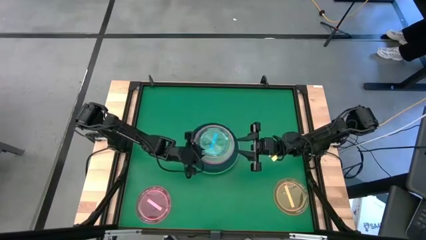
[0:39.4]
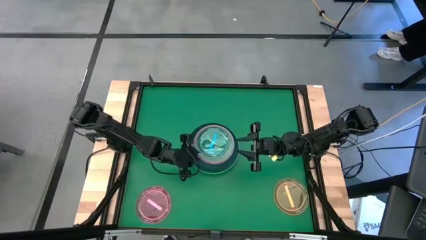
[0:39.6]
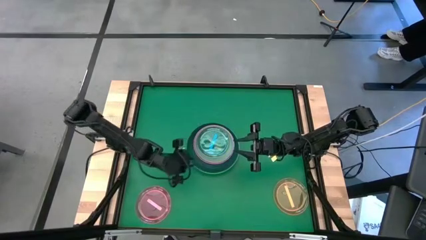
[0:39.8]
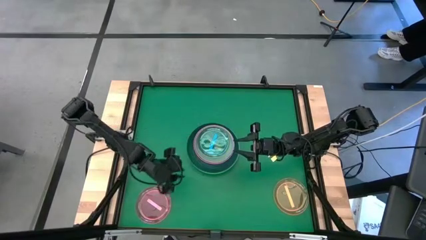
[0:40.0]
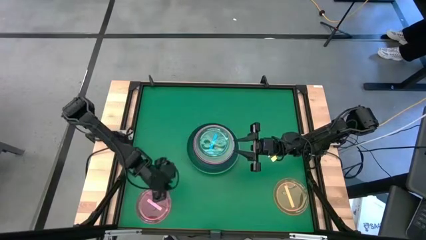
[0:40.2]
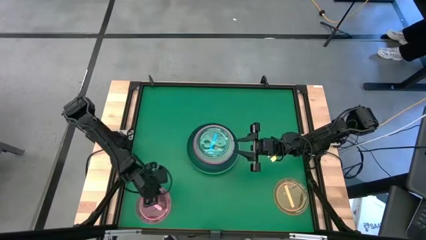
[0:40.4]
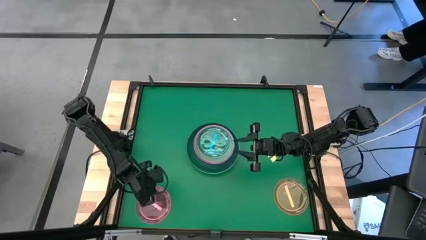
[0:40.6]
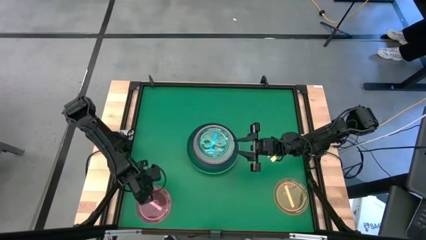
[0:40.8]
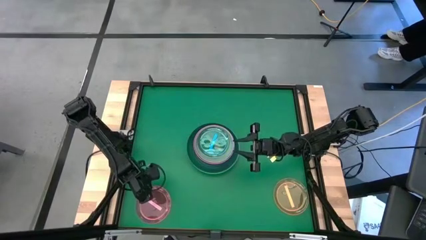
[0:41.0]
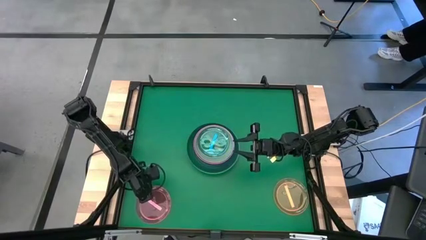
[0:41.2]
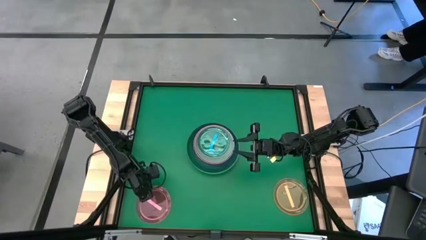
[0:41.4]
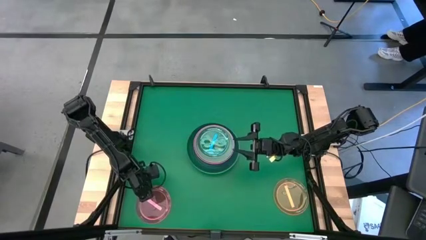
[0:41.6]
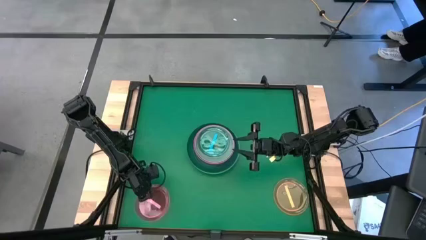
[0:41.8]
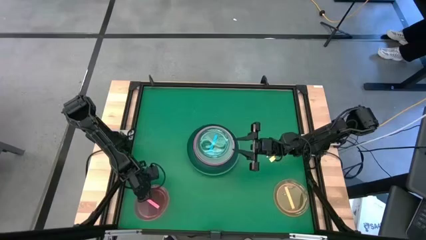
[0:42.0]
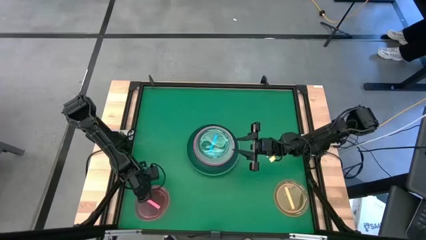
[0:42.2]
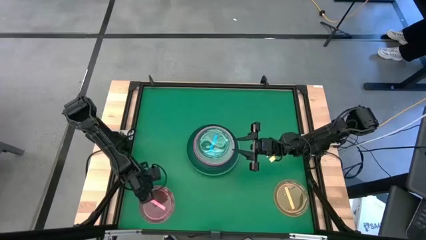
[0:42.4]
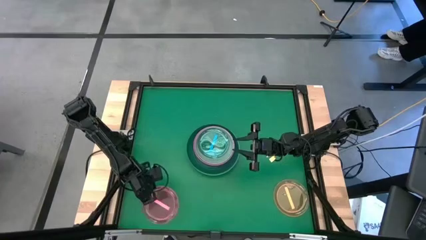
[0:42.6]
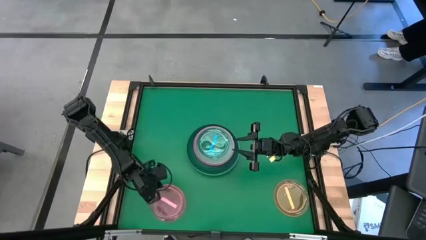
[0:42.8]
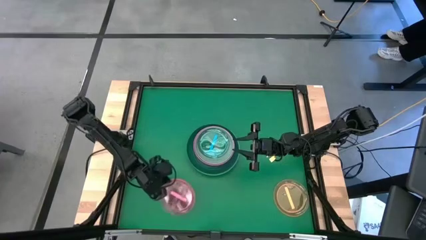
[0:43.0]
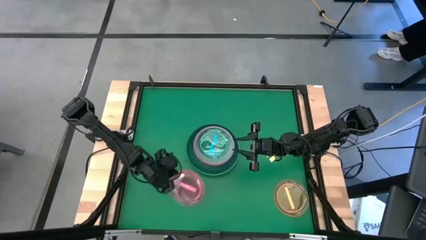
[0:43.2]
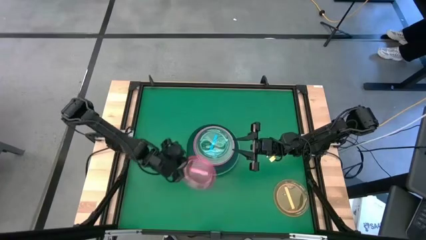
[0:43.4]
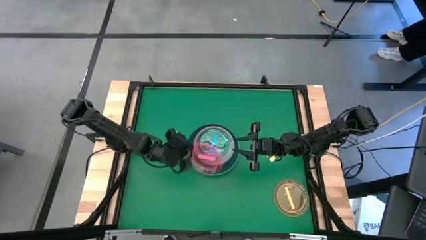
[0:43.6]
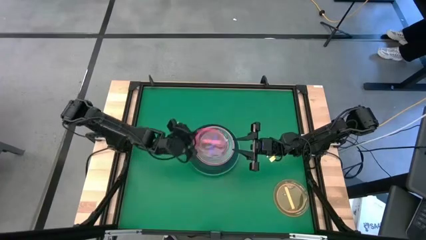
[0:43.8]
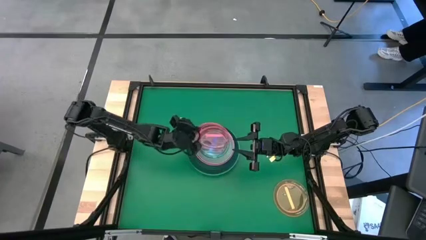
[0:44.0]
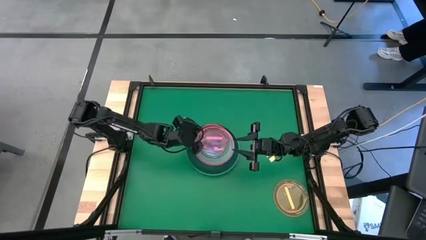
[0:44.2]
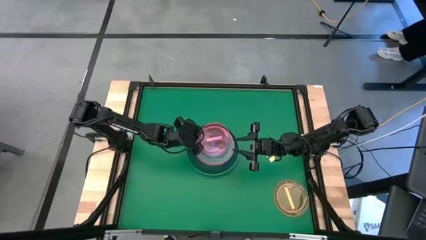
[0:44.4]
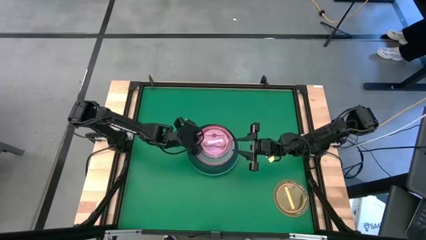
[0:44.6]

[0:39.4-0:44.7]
Task: Stack plastic plates
Stack the transparent pink plate on top of the transparent blue plate

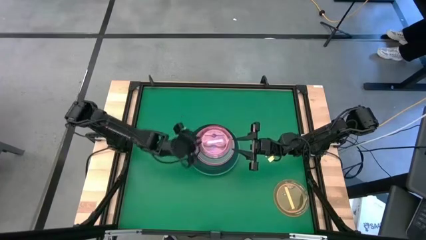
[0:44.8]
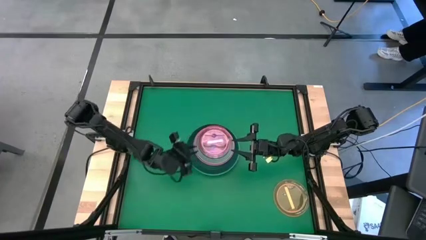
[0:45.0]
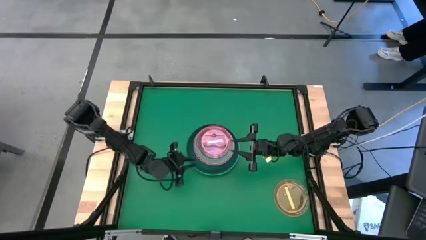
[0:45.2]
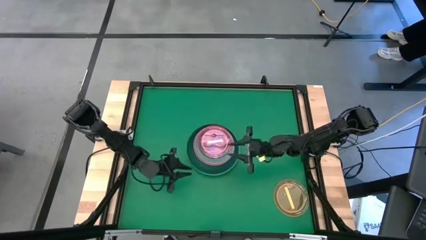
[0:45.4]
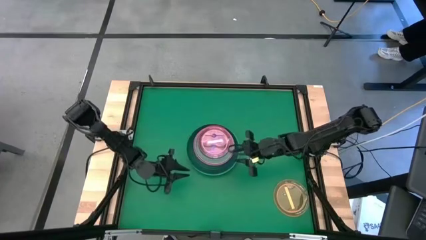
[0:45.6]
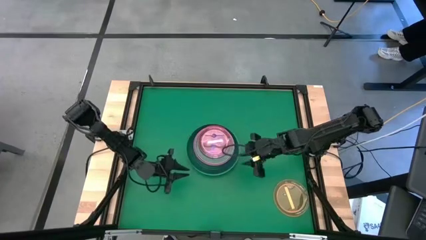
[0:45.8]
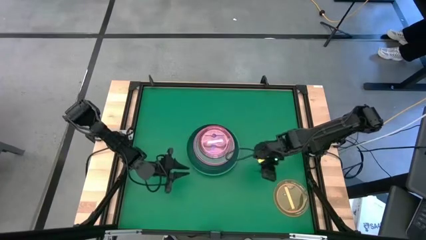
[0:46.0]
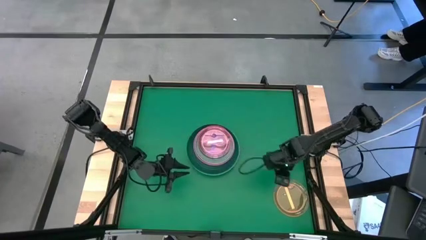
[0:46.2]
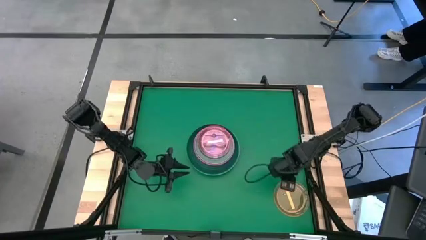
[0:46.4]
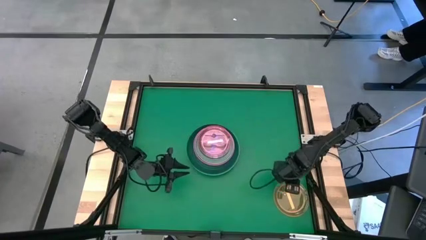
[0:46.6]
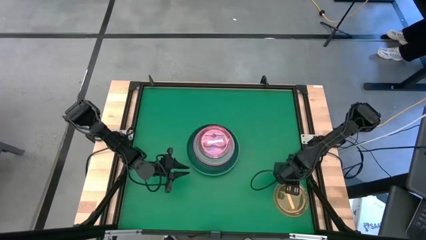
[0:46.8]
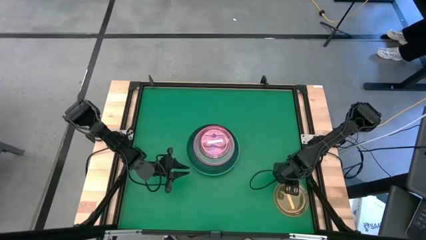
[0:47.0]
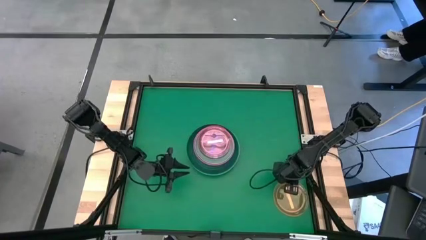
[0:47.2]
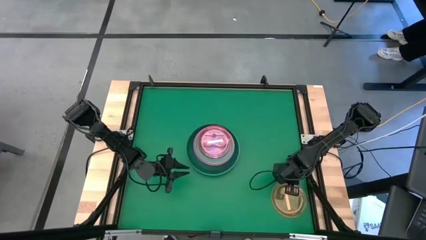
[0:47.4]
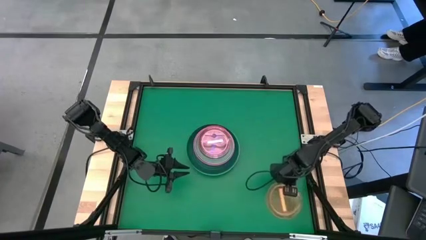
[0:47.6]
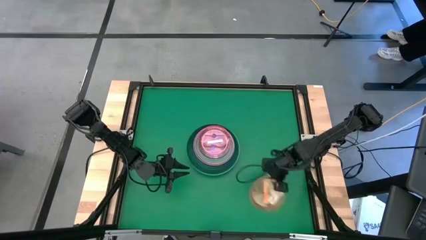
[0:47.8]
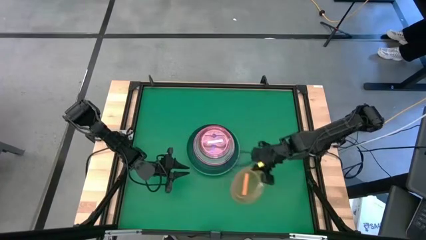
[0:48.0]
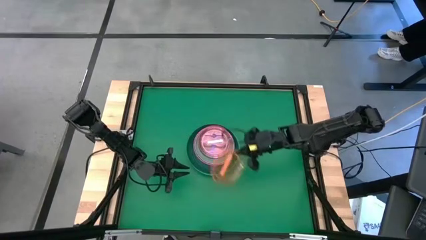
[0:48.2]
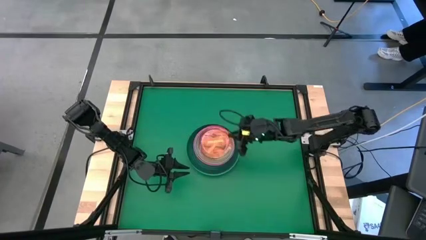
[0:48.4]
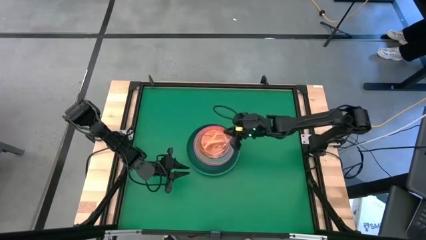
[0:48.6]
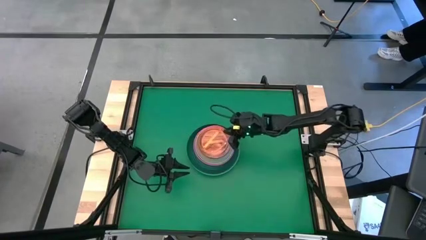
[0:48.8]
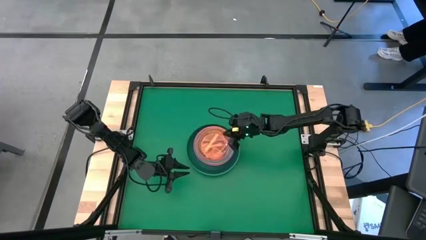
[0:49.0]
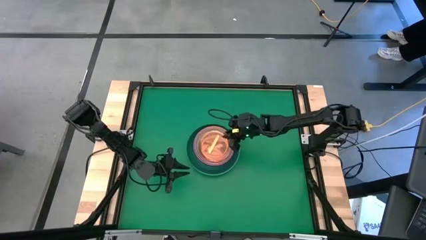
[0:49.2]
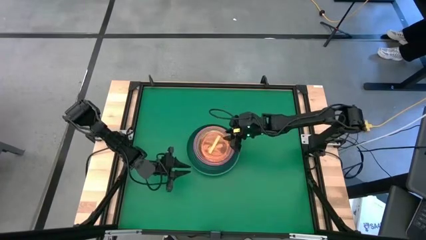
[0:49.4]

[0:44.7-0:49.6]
Stack the transparent orange plate on top of the transparent pink plate

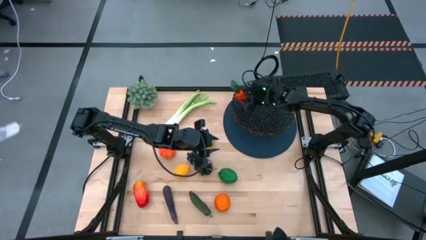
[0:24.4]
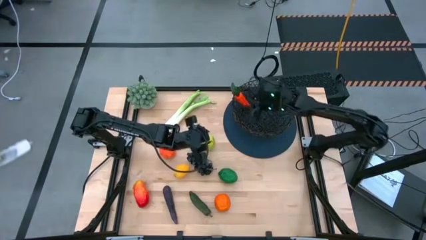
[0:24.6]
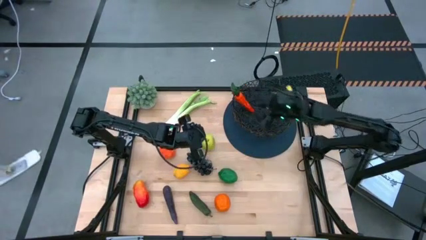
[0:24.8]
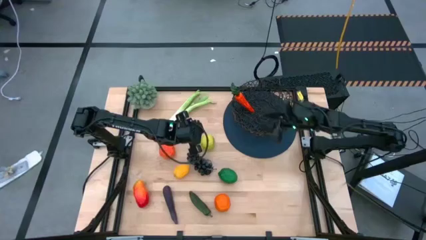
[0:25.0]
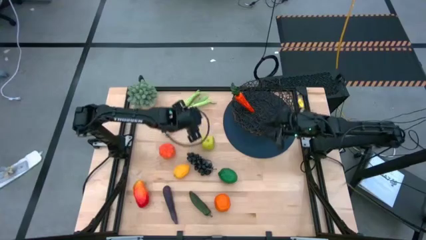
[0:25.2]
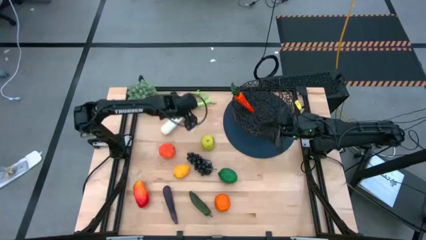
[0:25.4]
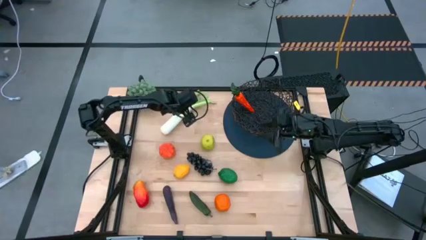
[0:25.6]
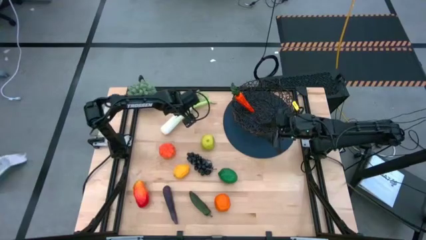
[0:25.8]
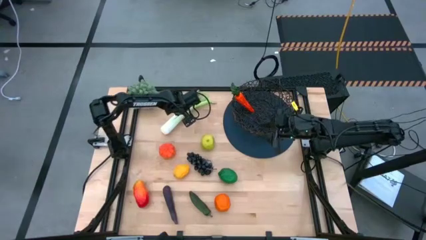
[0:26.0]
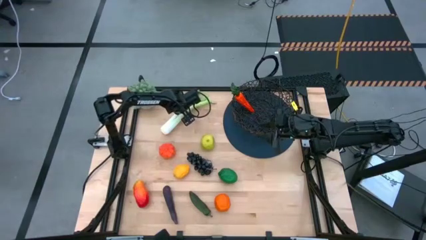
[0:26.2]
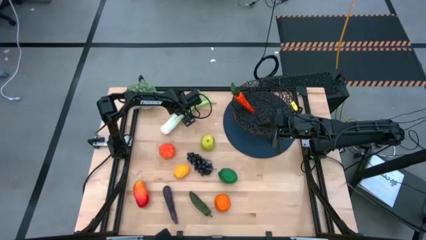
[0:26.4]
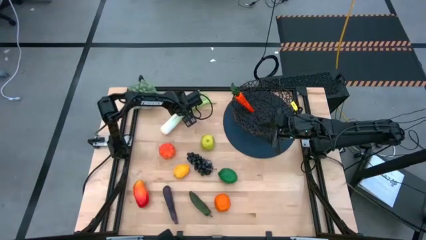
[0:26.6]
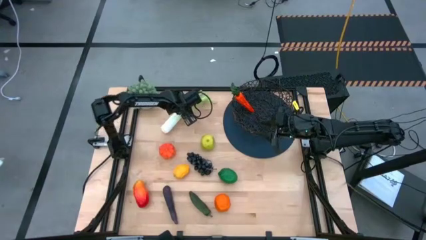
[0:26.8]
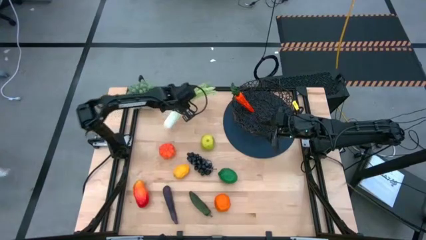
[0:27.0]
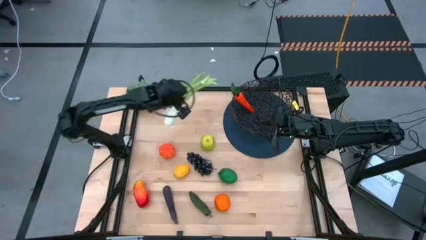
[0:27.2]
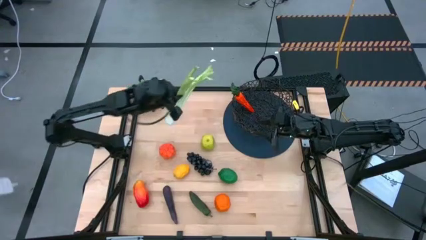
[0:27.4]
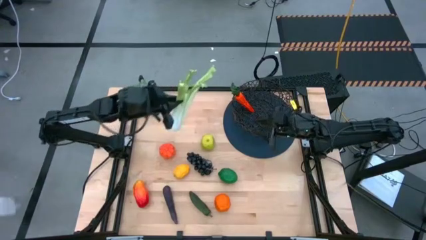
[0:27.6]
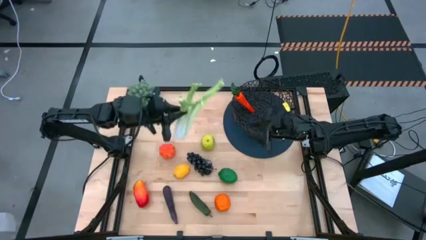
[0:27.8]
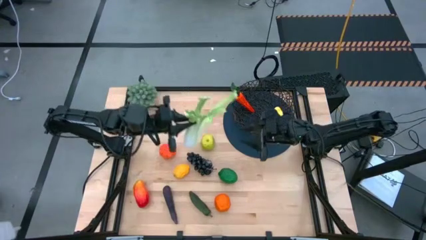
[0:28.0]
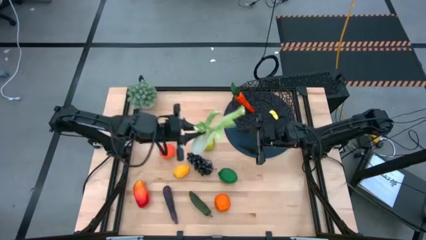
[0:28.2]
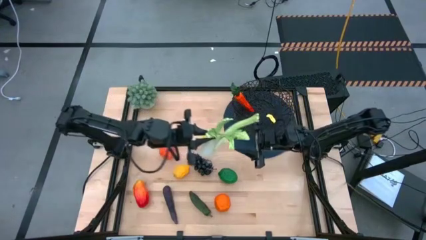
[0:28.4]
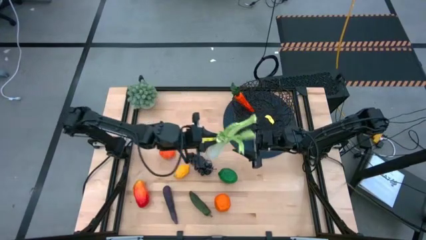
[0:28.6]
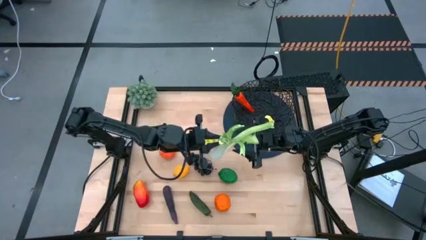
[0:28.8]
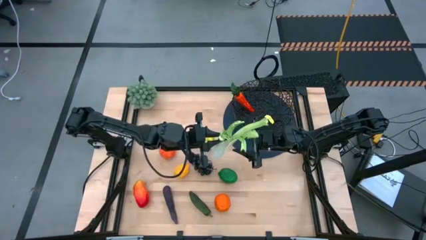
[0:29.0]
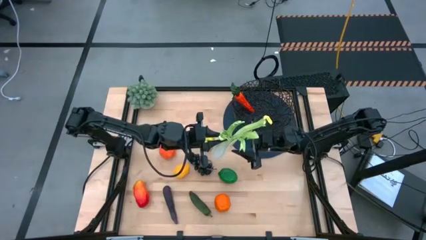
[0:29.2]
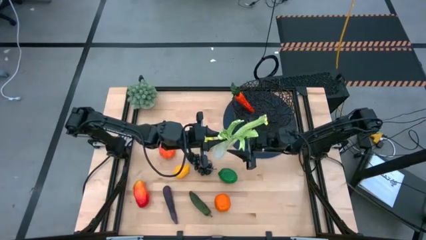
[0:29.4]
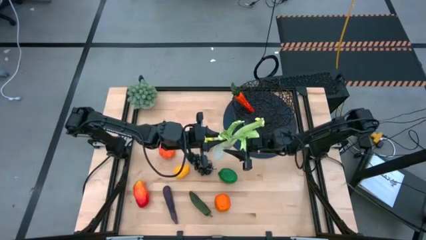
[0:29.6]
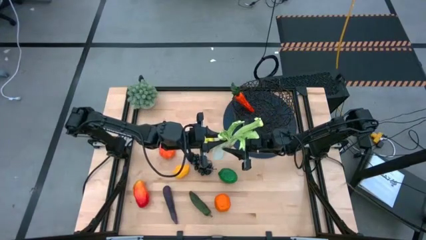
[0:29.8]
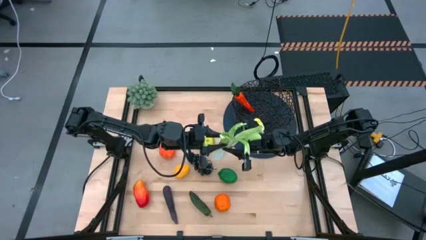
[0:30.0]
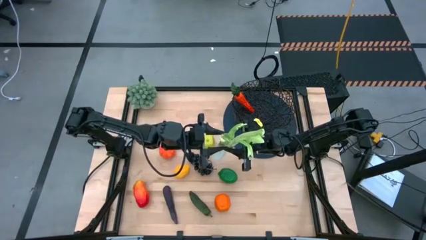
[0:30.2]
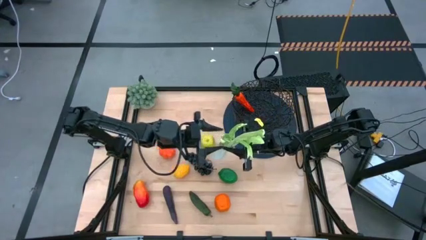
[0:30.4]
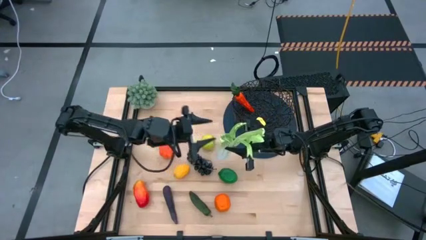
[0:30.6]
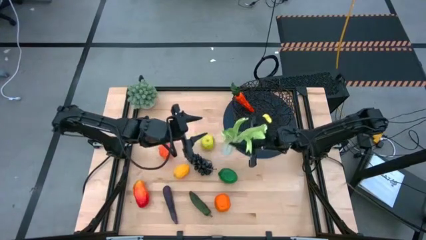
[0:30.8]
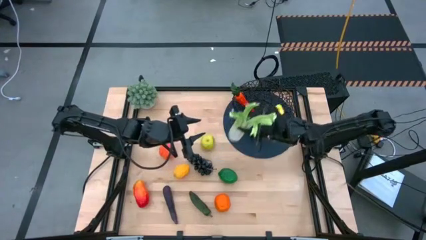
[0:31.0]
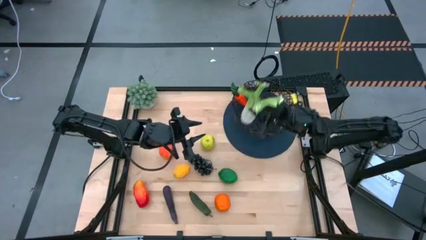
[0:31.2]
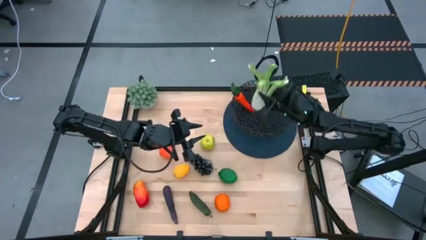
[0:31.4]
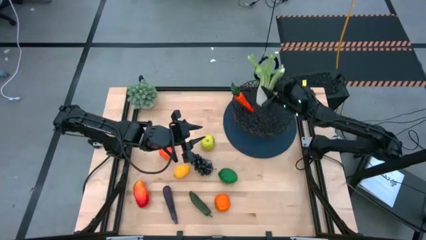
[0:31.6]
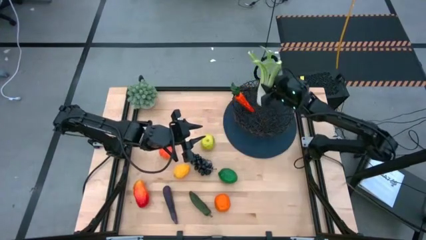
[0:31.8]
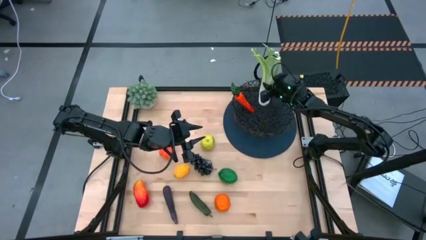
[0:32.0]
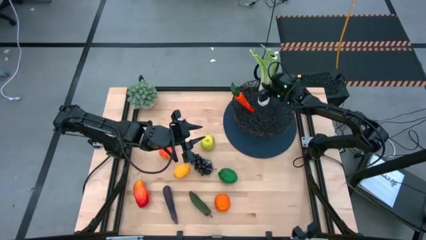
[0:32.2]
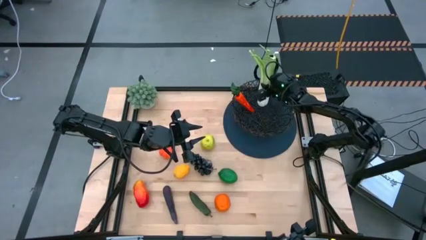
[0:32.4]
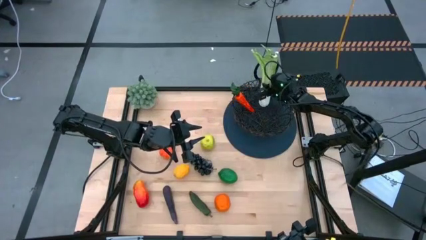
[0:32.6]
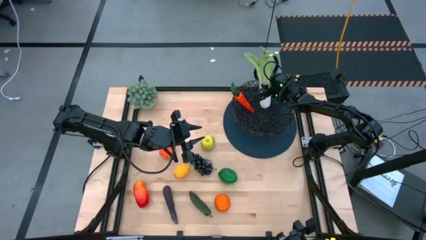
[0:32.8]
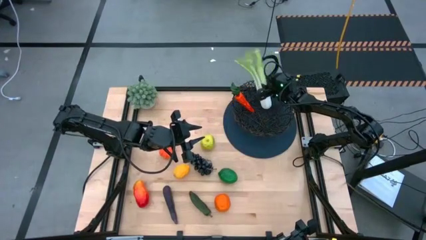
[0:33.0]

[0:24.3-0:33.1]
Task: Build produce basket
Put the green celery into the black wire basket
